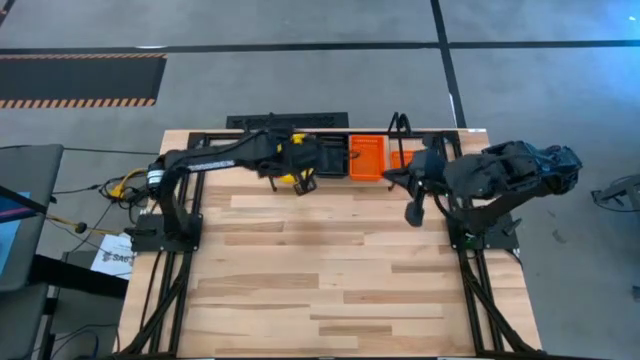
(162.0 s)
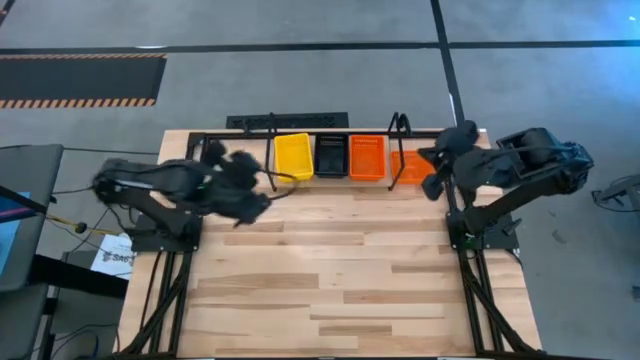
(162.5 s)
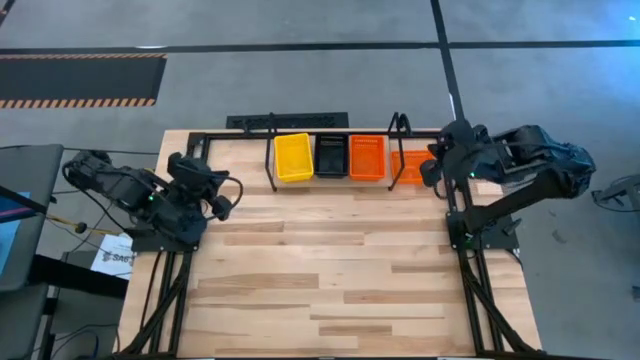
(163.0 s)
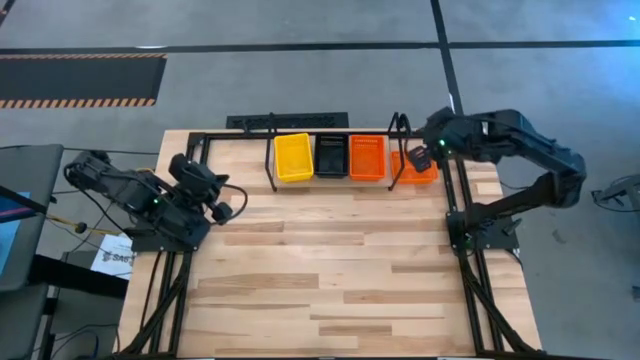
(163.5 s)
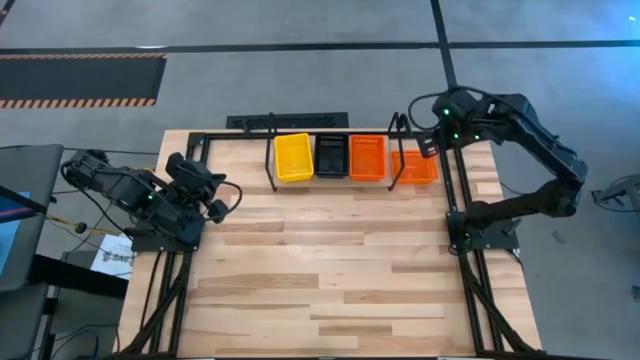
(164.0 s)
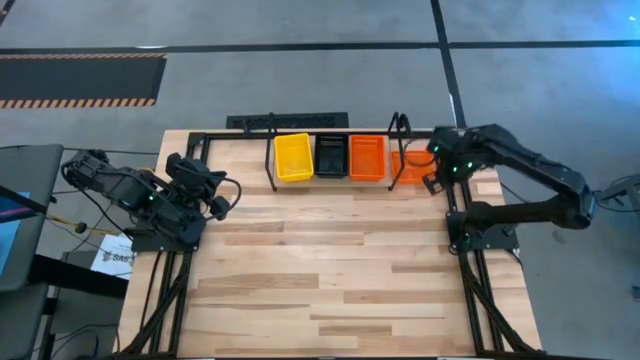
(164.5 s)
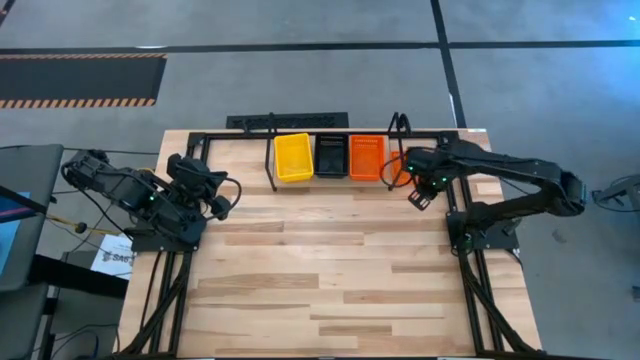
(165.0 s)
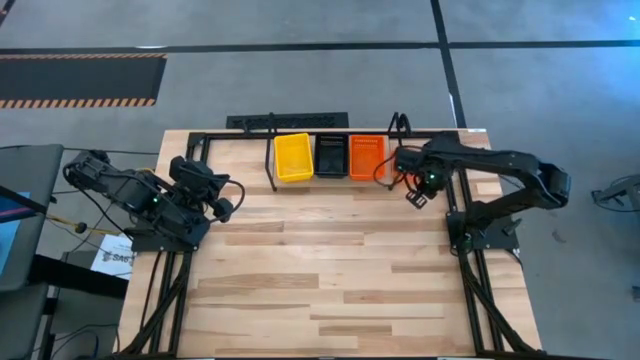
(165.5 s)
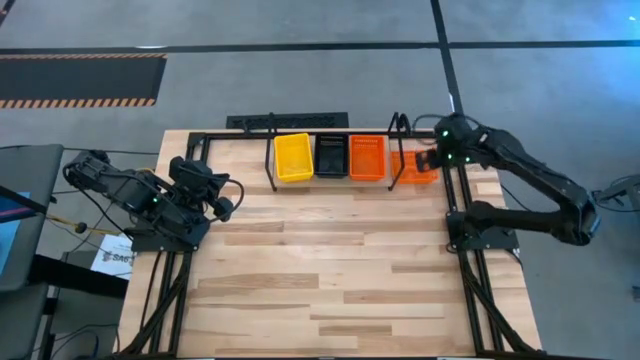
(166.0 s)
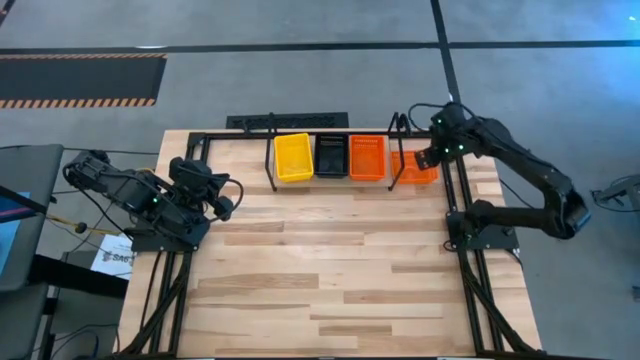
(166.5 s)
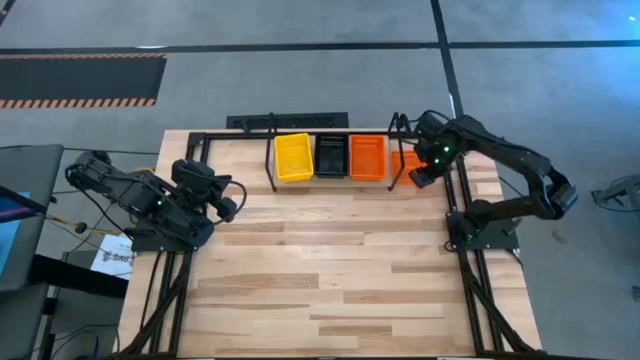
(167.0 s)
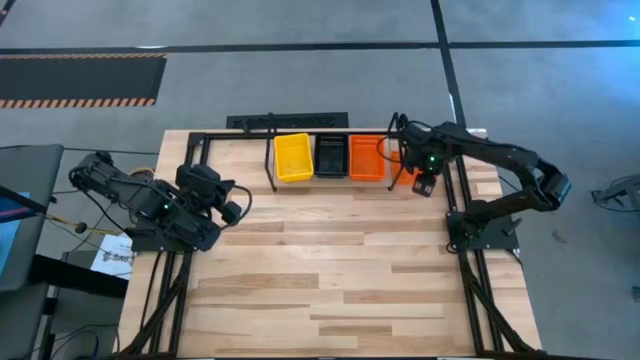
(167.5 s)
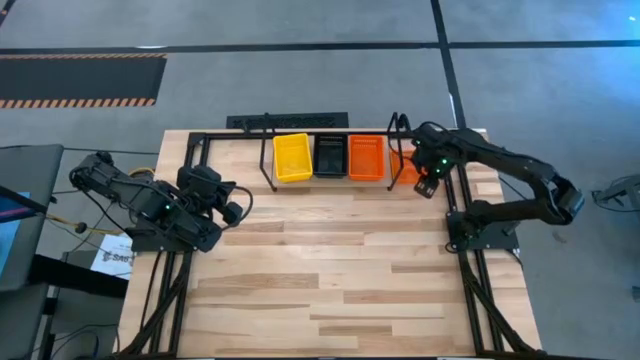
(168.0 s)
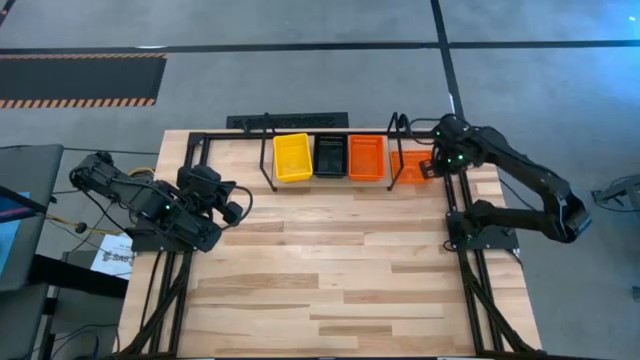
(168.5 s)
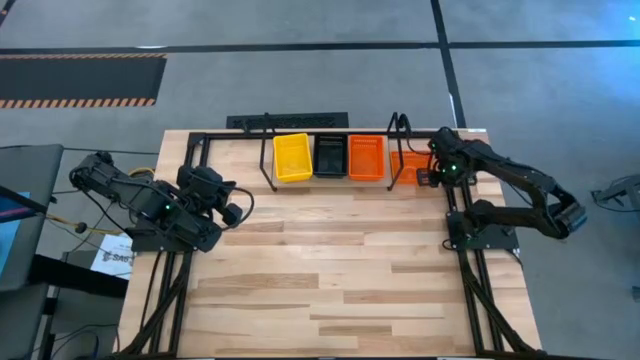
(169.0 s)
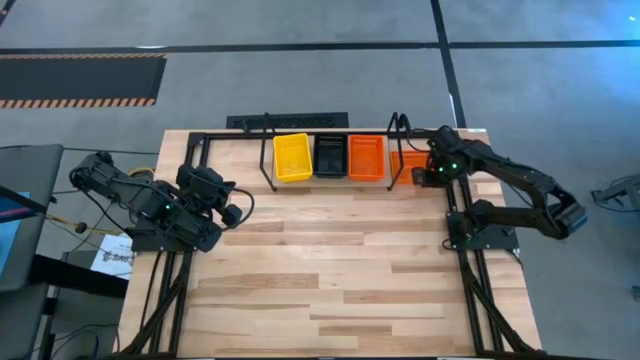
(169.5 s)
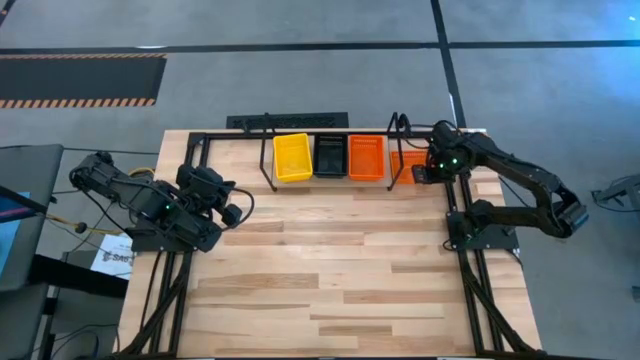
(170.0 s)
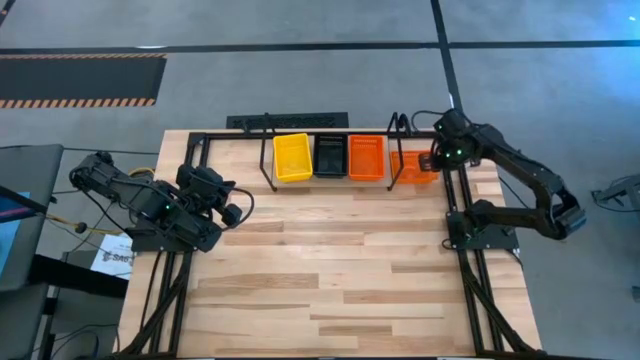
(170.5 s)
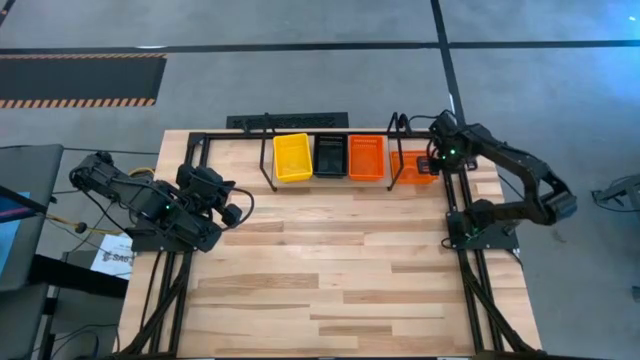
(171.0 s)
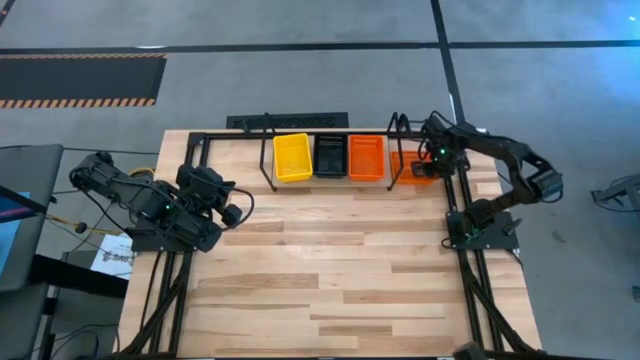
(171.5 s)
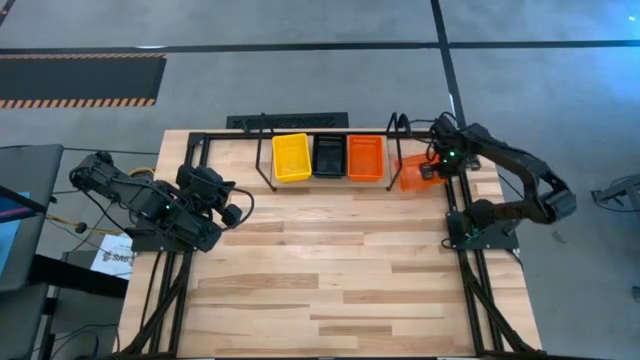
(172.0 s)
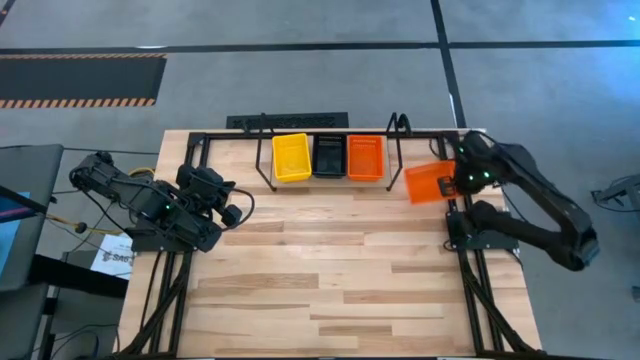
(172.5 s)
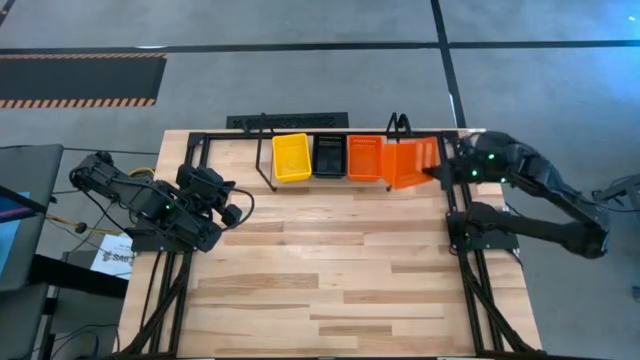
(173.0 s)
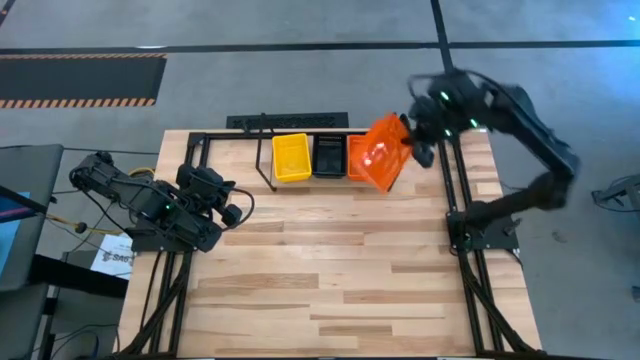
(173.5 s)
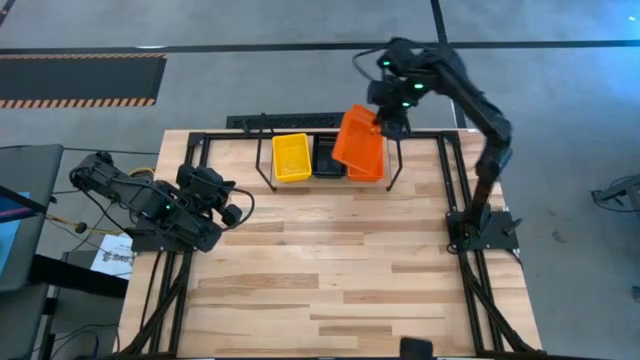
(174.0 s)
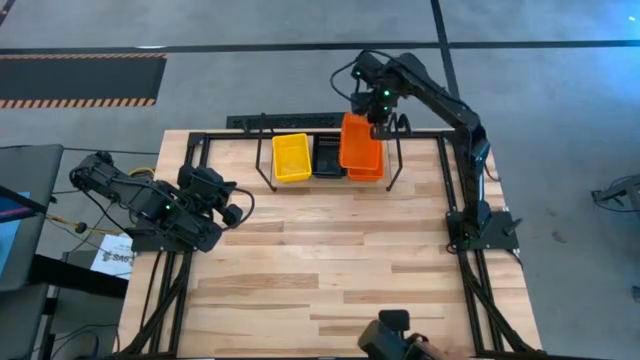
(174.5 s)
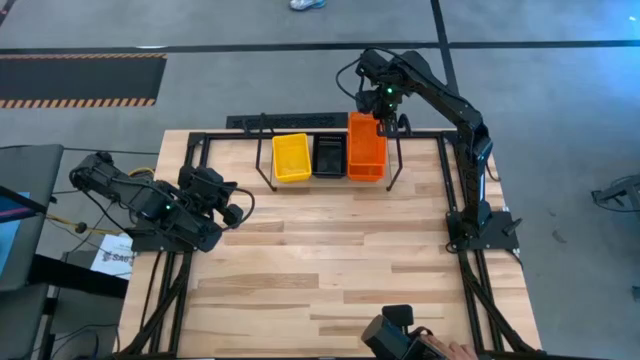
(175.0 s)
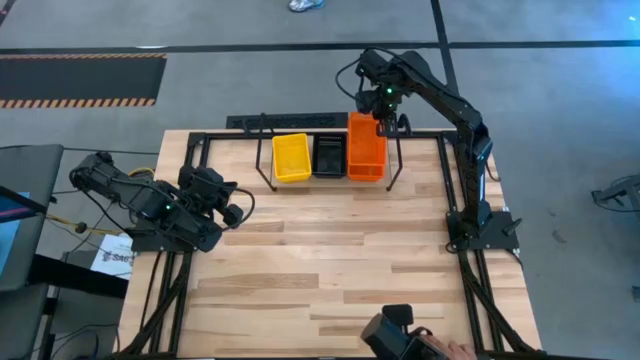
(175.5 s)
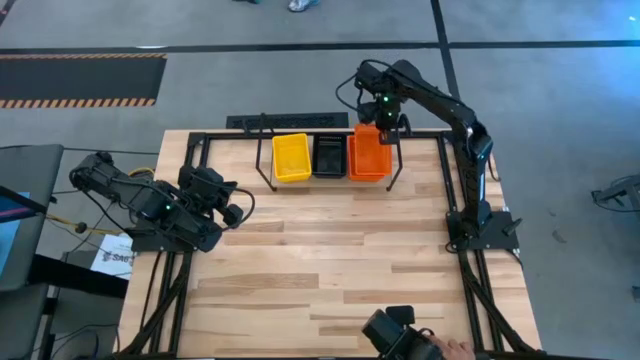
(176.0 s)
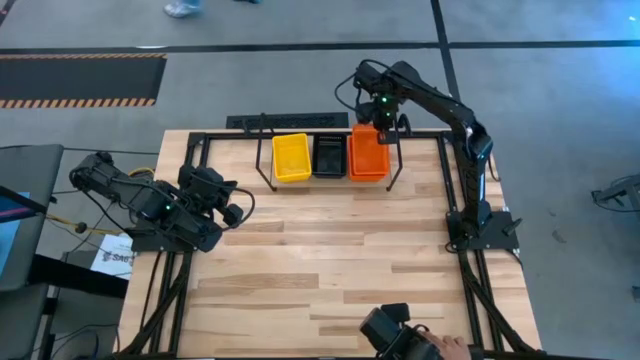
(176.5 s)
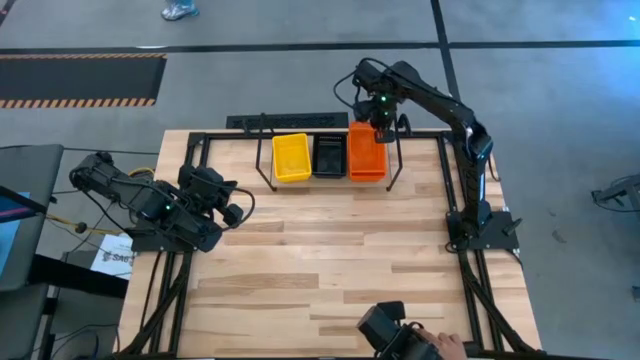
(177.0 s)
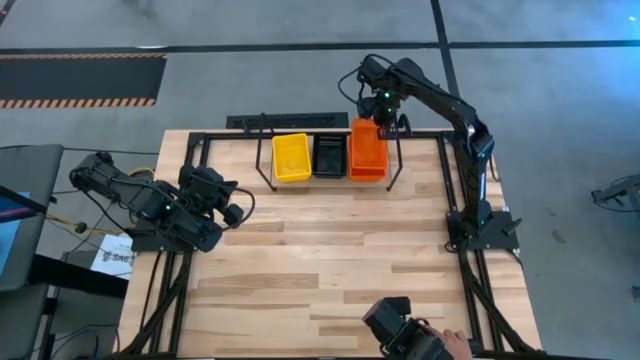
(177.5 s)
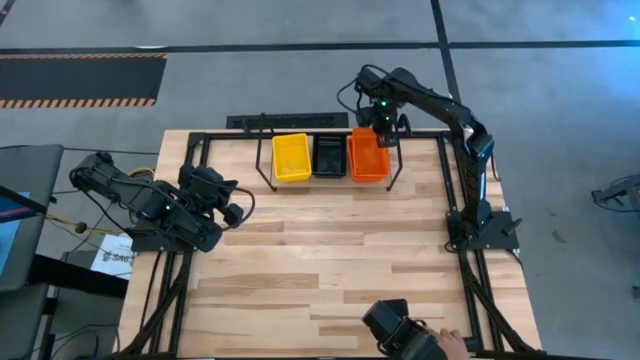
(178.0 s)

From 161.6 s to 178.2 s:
Task: Stack baskets on shelf by color
Stack the orange bin on top of the other orange bin on the shelf

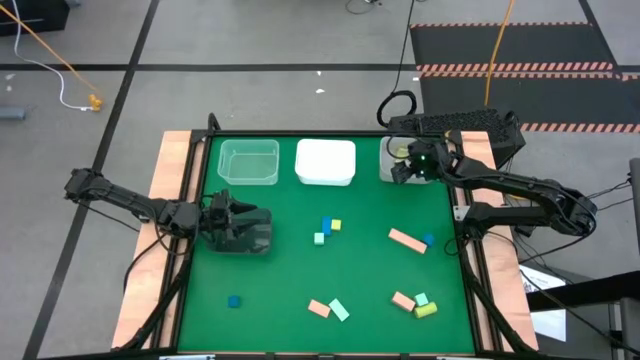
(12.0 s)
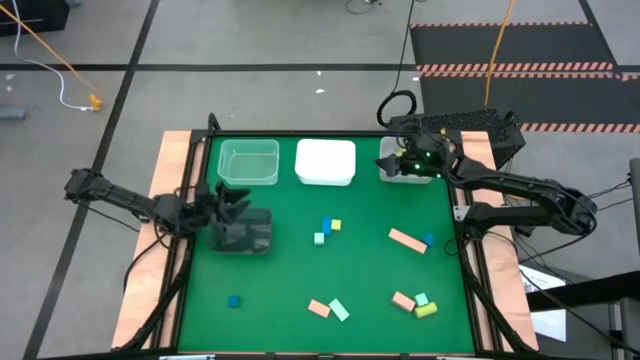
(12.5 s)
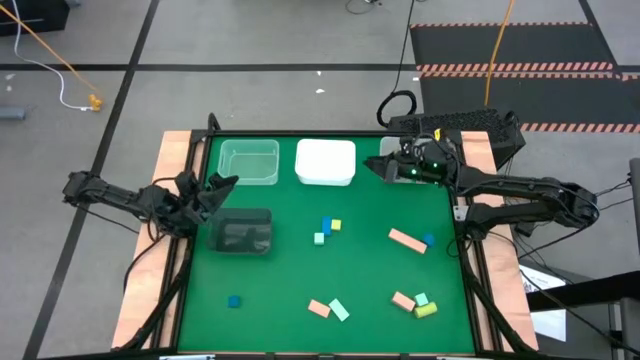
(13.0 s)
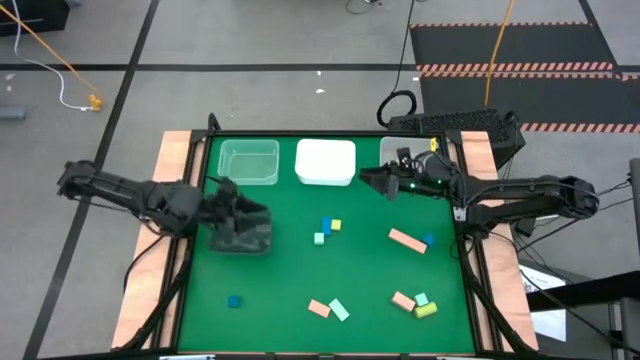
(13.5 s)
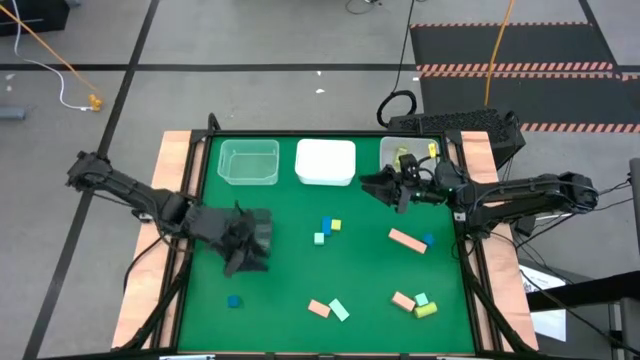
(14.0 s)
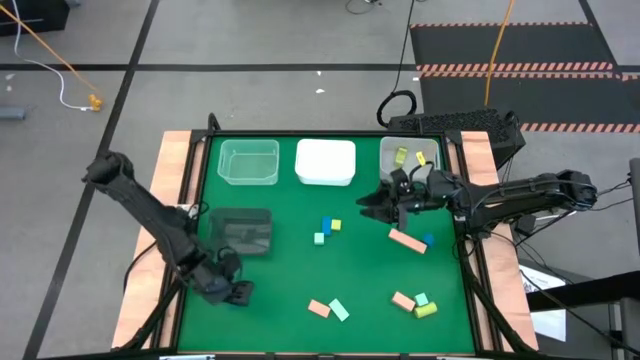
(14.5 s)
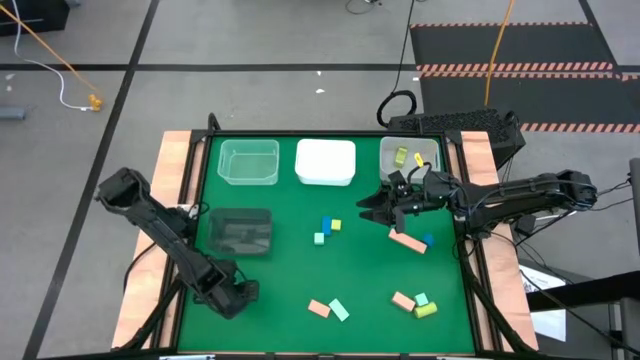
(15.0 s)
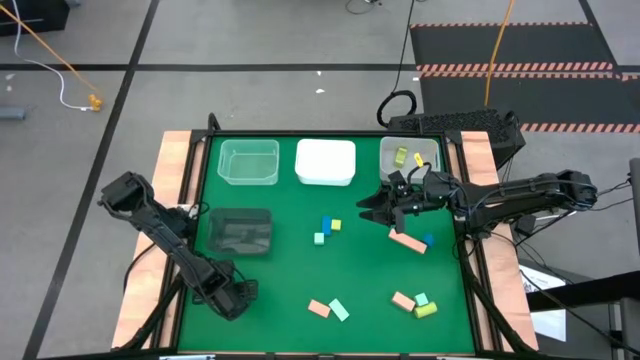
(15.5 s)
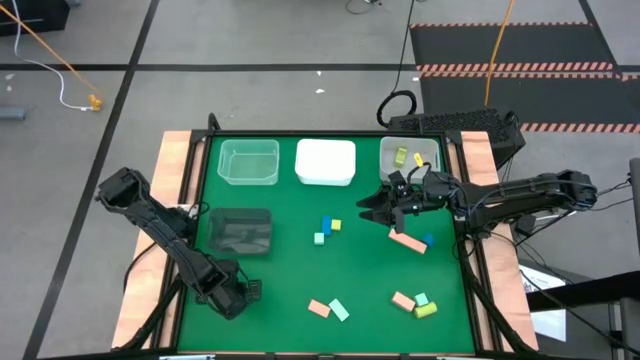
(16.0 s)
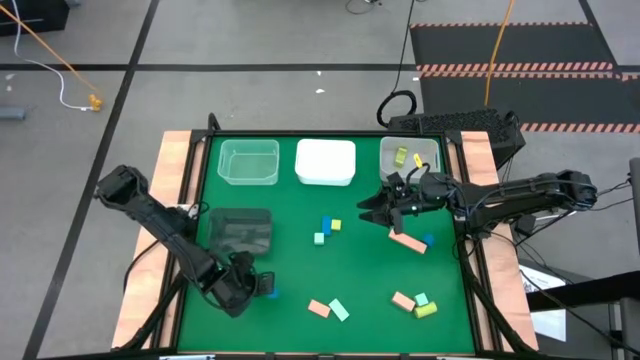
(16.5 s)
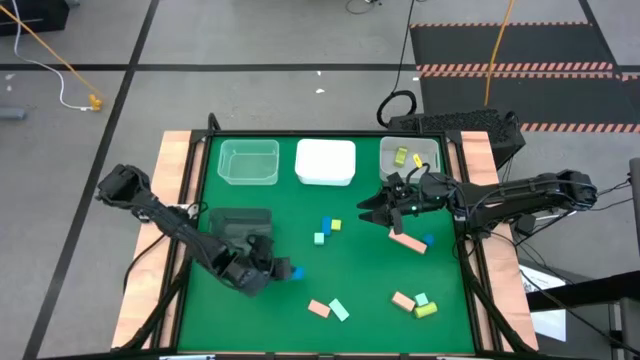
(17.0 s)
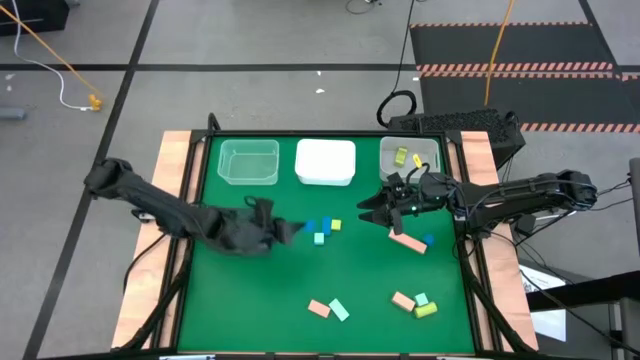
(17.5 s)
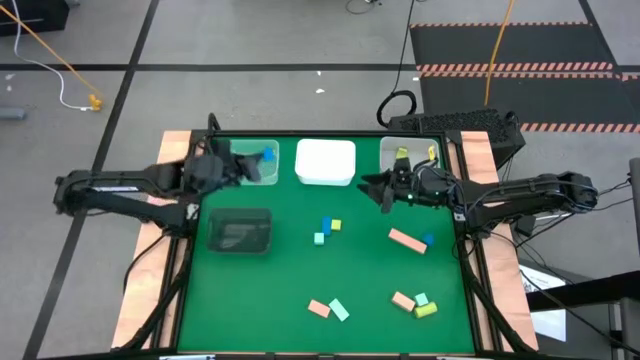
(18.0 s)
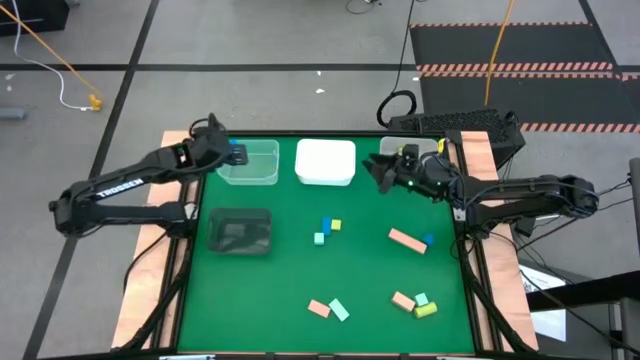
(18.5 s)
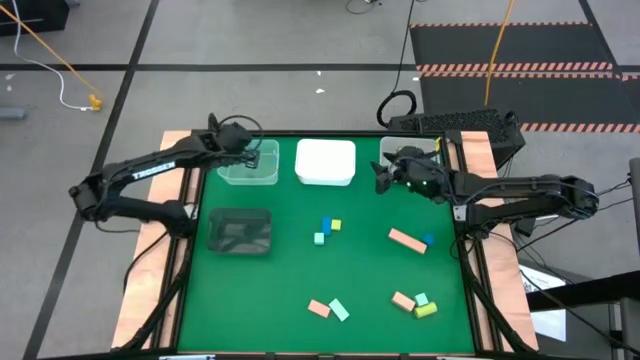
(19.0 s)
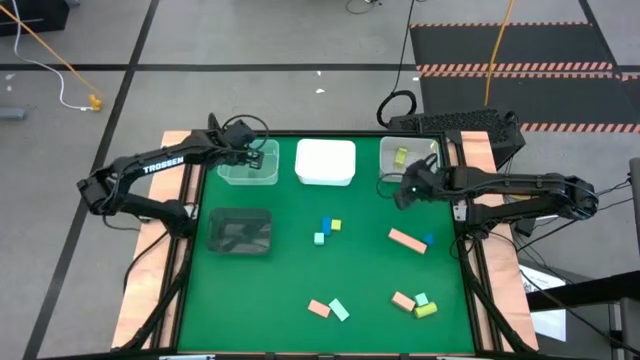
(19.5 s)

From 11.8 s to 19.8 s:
Task: Sort & place blocks by color
Put the blue block into the transparent bin
